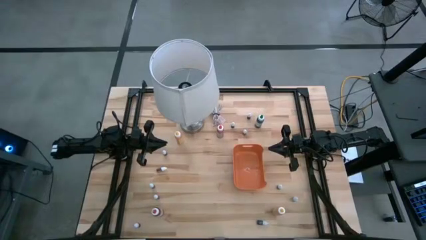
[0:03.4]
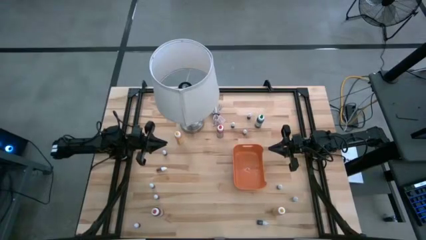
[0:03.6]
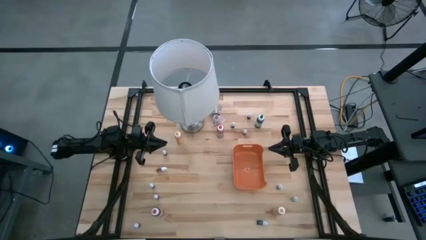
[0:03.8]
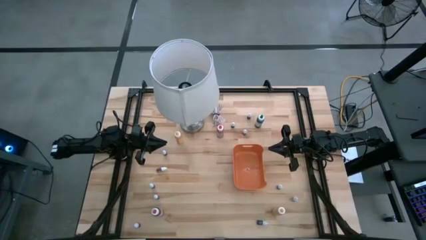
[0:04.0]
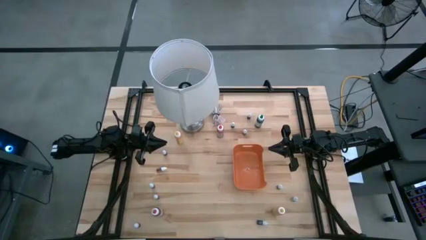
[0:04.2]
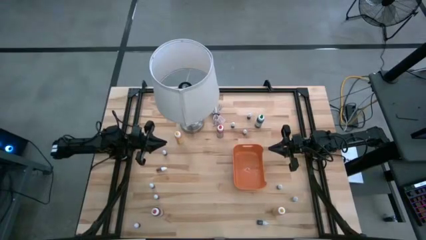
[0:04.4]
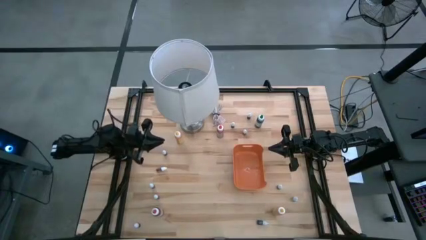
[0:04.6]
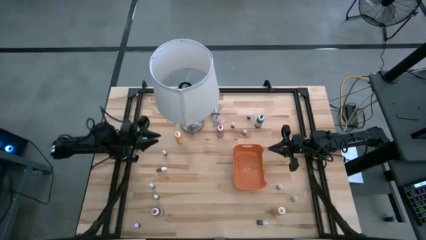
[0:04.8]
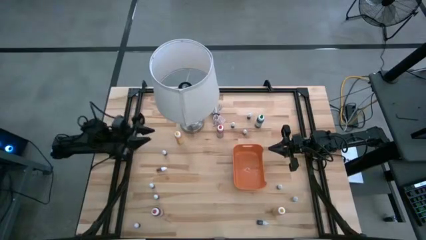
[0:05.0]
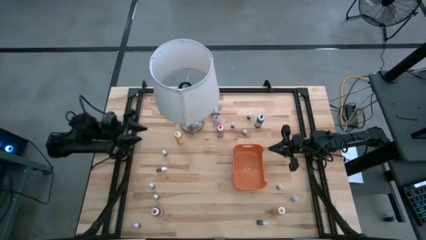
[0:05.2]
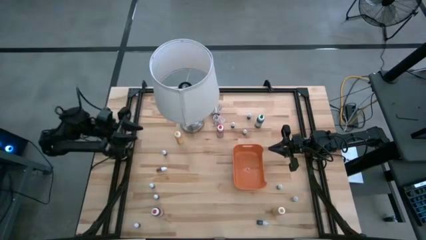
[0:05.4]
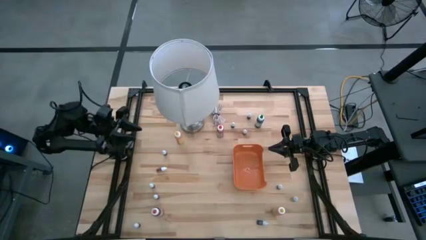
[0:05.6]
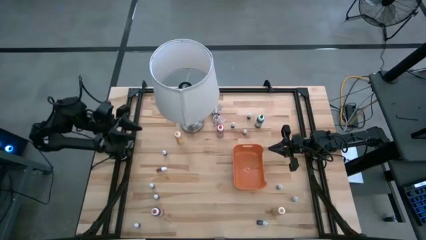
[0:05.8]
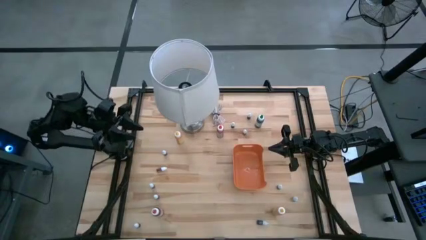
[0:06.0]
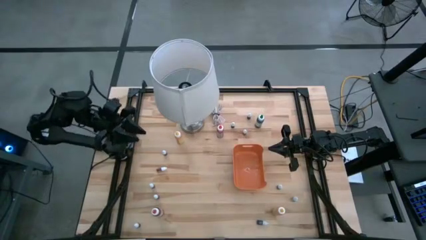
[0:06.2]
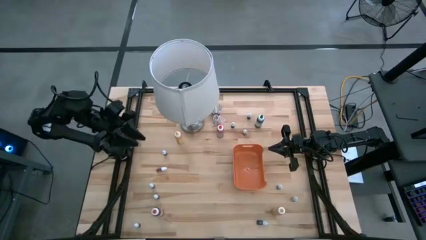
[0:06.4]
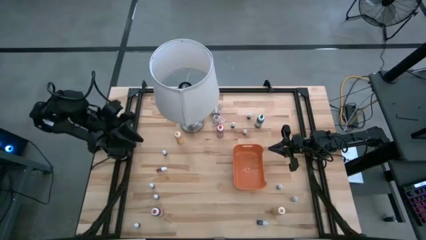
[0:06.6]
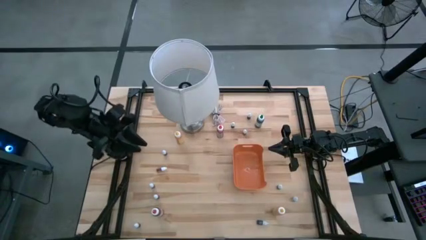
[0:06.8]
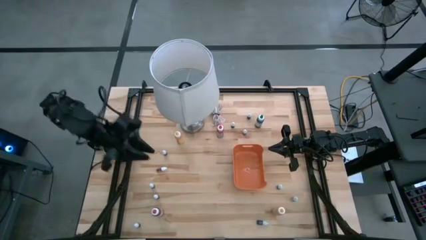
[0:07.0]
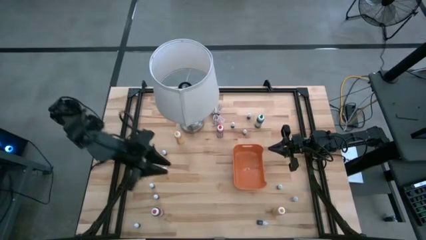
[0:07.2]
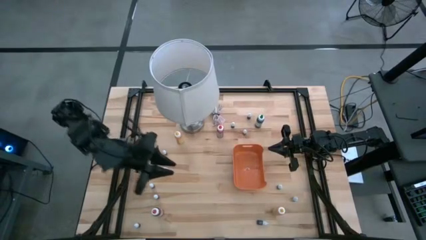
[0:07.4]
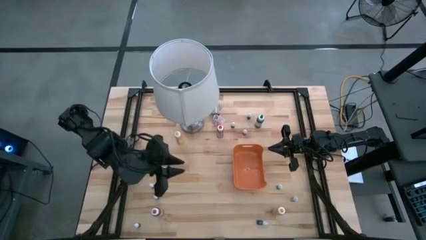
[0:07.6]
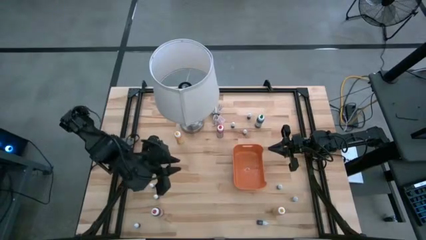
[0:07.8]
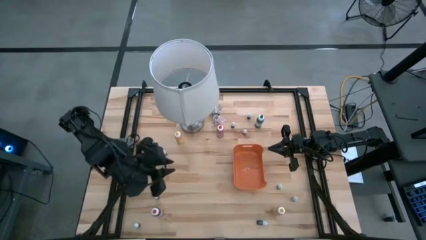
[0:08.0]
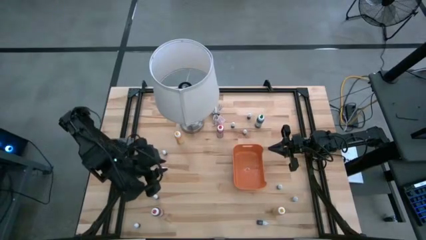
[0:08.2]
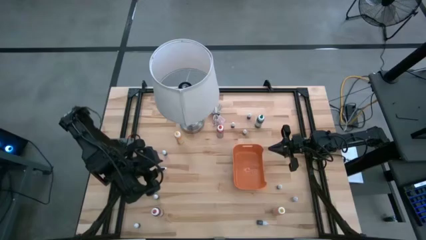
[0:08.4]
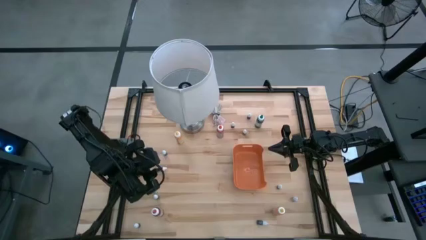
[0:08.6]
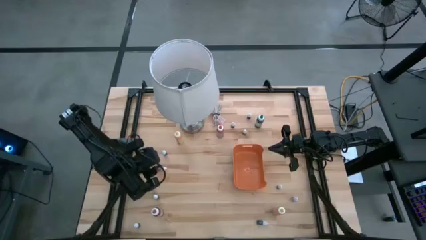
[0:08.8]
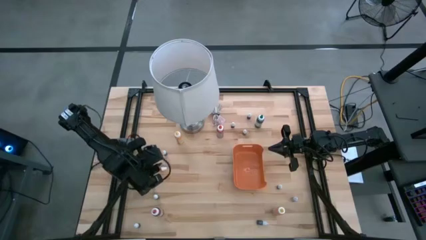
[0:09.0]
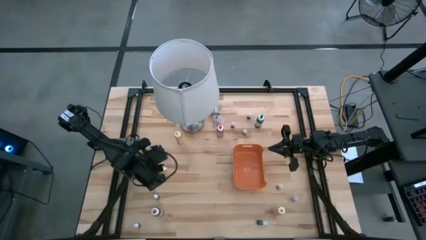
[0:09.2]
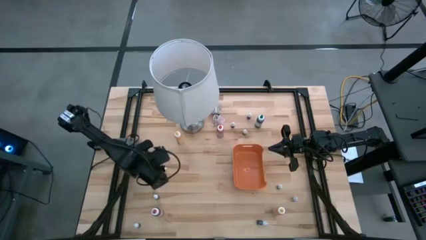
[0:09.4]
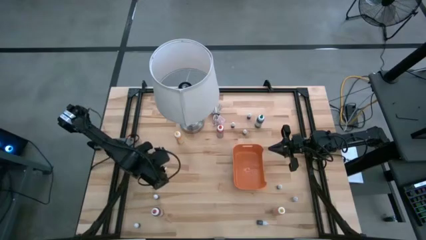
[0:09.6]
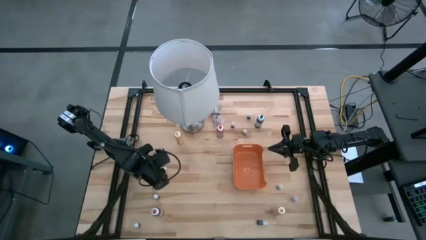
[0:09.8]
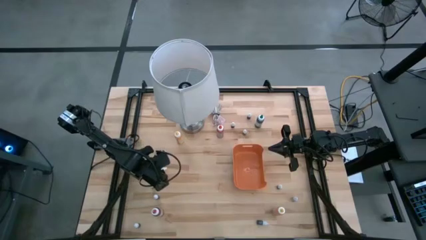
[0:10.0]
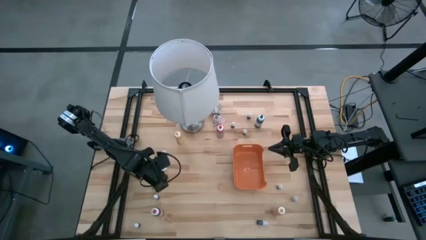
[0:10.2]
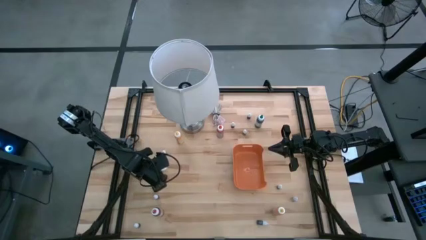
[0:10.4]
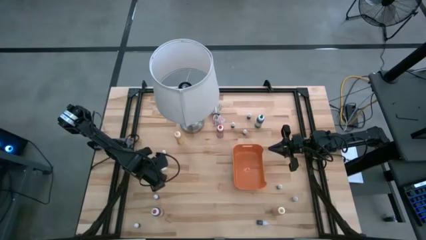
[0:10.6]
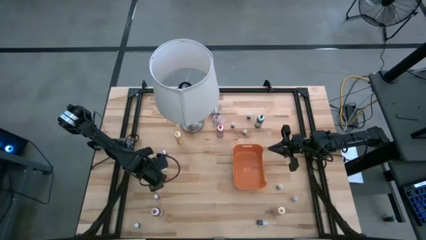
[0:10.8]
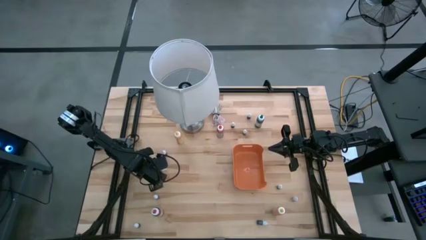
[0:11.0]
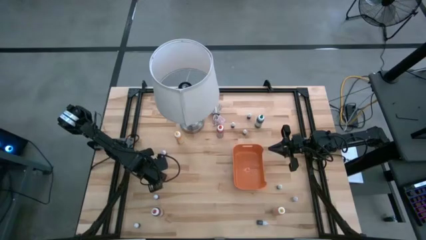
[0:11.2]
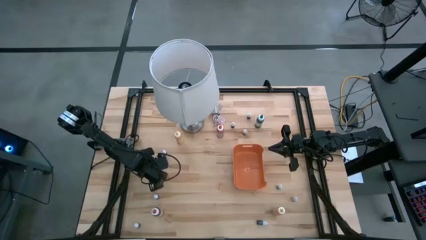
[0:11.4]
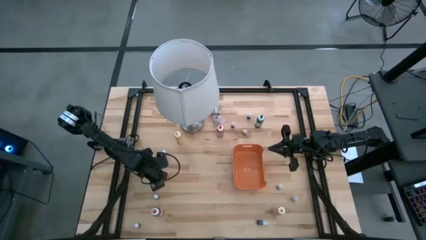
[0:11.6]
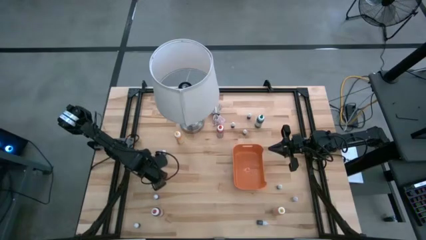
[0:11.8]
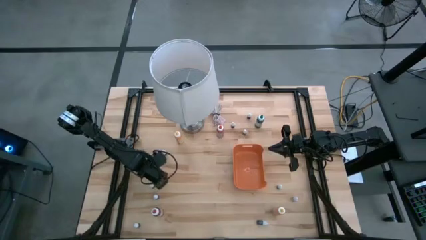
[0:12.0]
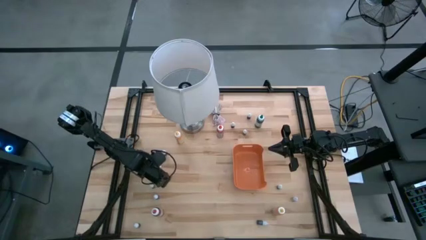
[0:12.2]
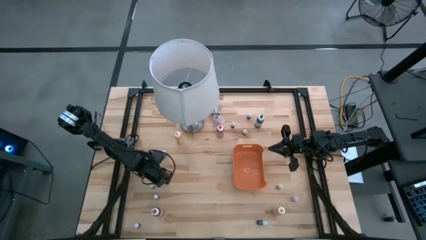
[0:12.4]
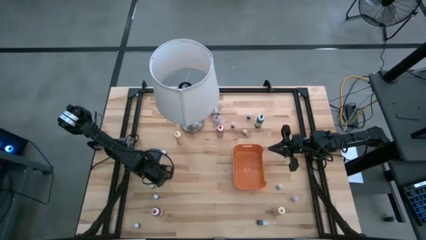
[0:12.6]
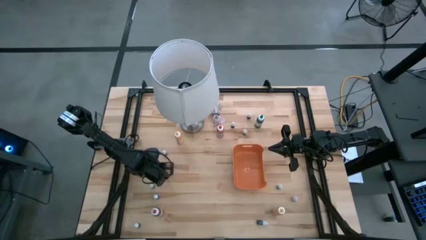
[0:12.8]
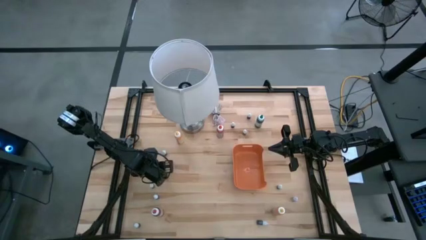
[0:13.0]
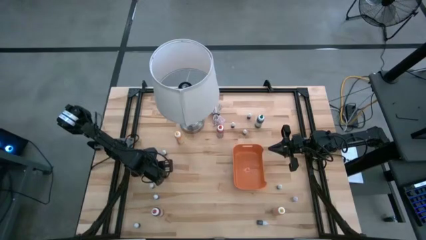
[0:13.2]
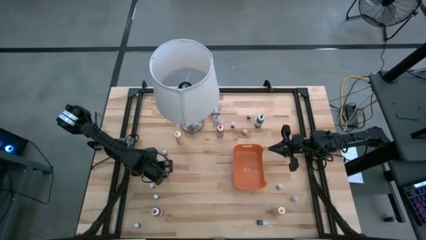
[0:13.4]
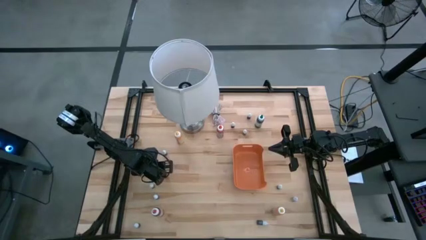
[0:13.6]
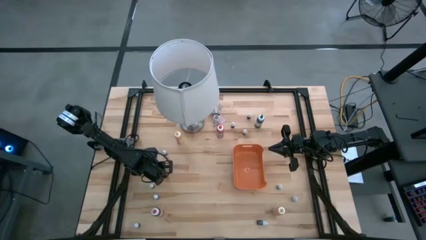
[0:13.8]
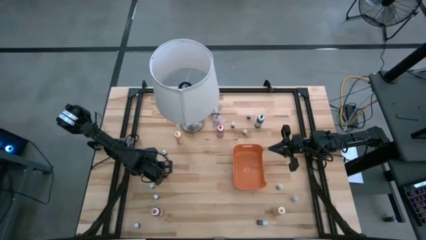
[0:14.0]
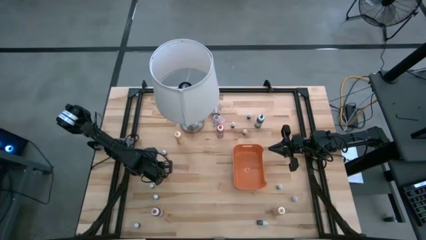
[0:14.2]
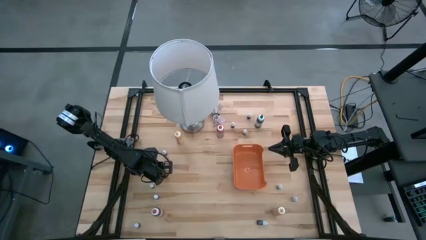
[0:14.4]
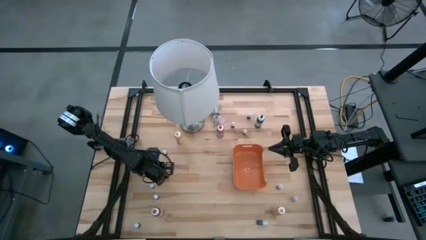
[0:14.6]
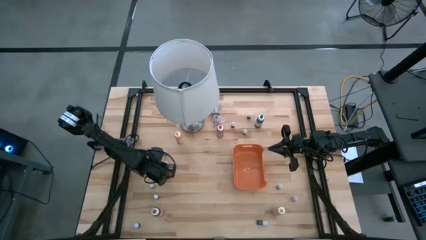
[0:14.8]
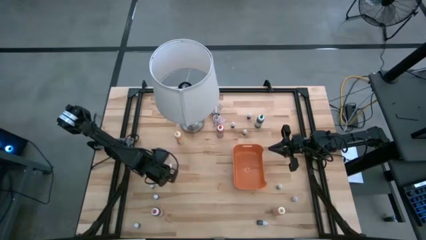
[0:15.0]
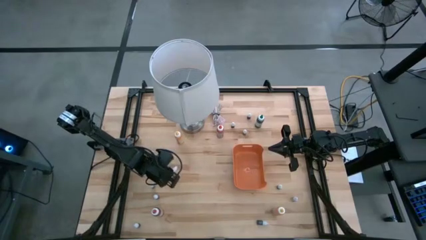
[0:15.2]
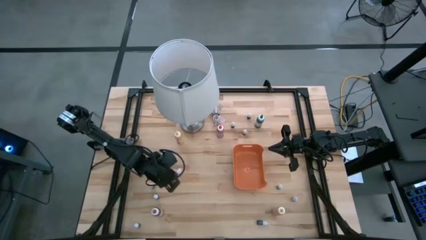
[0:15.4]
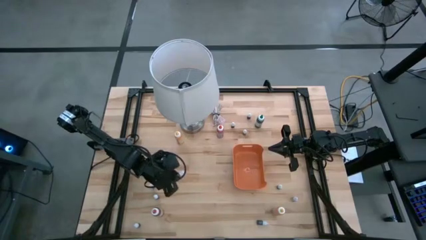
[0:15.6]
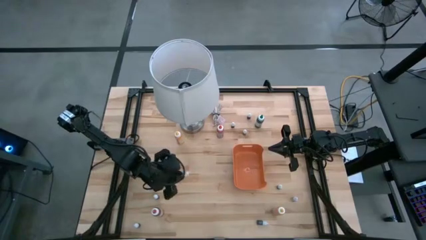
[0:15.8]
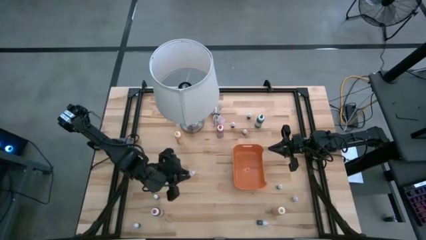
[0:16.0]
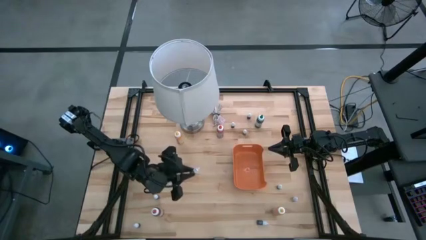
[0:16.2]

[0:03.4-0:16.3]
Task: Pick & Place food coloring
Put the small food coloring bottle into the orange bin
